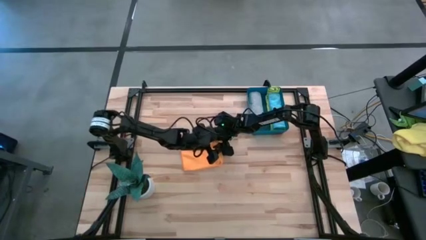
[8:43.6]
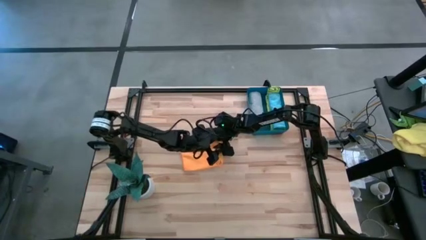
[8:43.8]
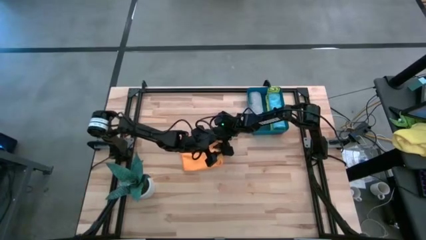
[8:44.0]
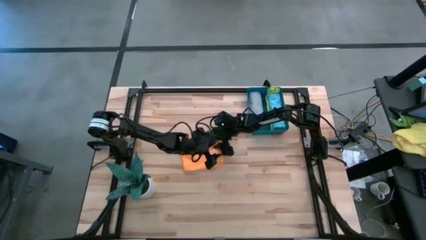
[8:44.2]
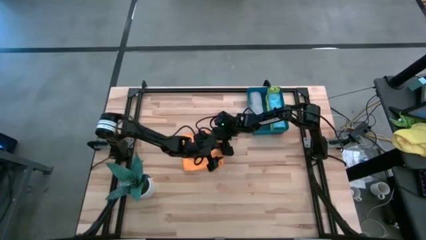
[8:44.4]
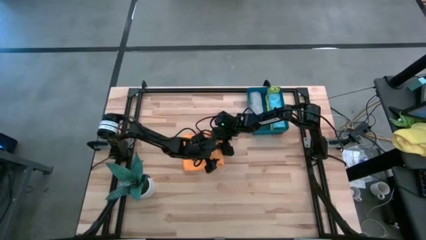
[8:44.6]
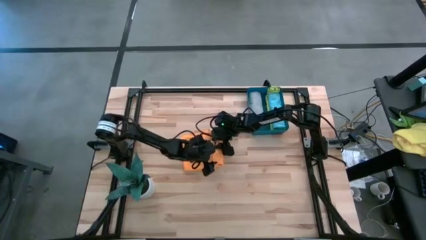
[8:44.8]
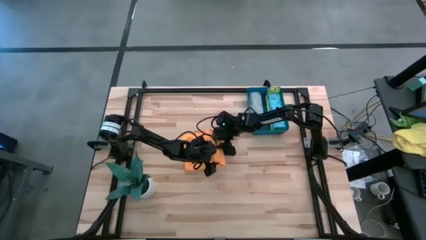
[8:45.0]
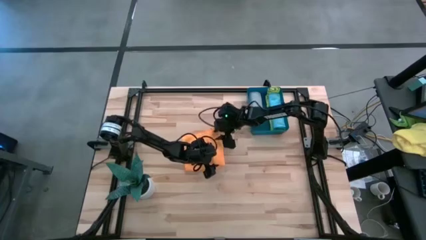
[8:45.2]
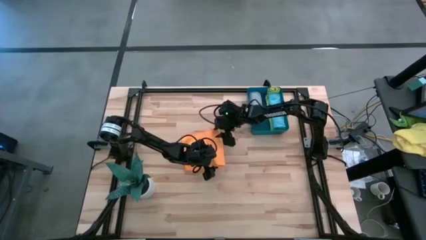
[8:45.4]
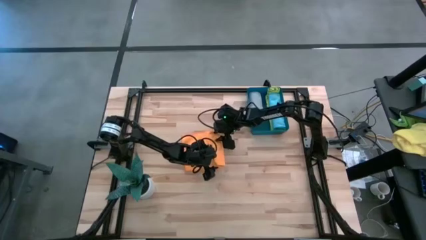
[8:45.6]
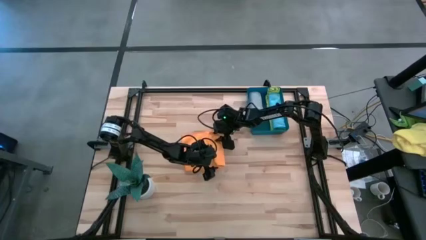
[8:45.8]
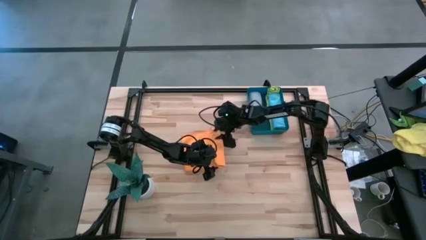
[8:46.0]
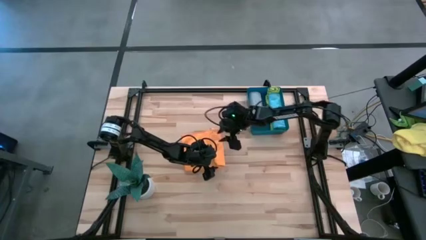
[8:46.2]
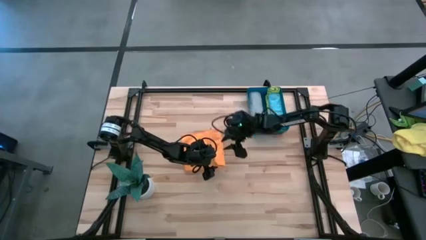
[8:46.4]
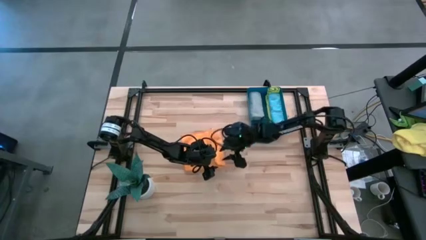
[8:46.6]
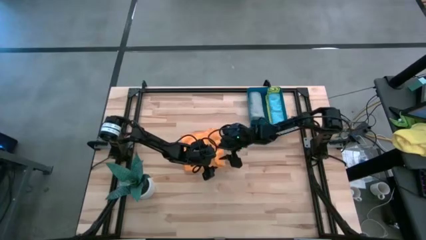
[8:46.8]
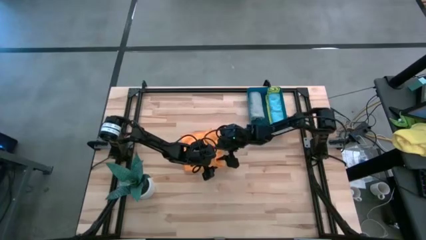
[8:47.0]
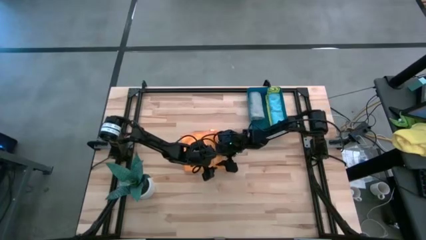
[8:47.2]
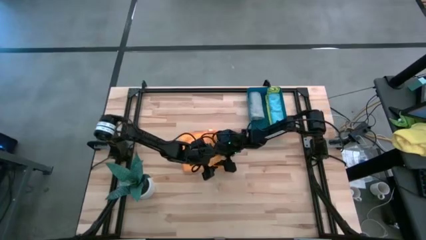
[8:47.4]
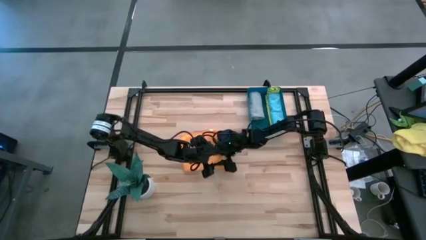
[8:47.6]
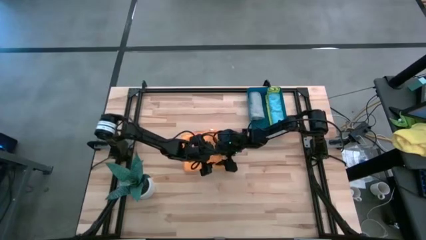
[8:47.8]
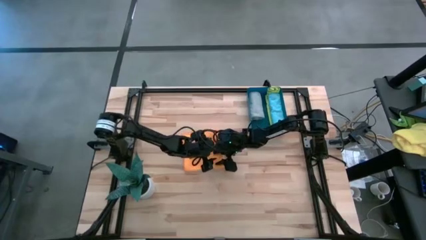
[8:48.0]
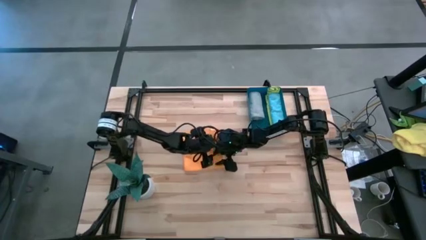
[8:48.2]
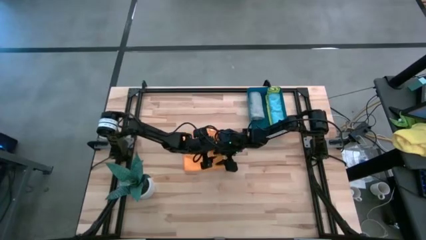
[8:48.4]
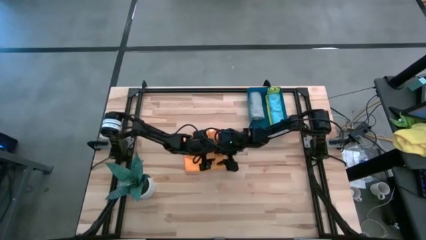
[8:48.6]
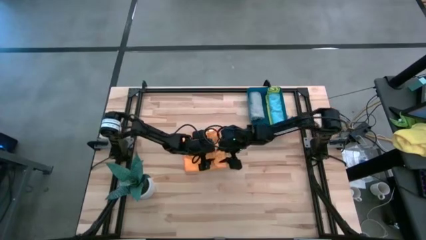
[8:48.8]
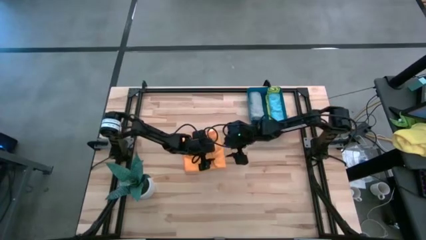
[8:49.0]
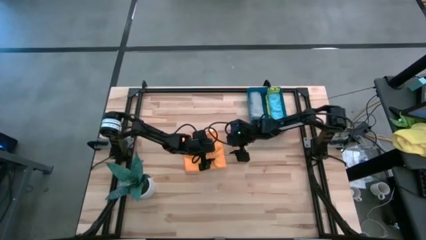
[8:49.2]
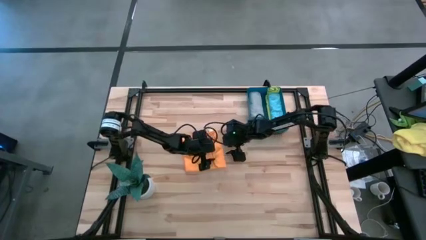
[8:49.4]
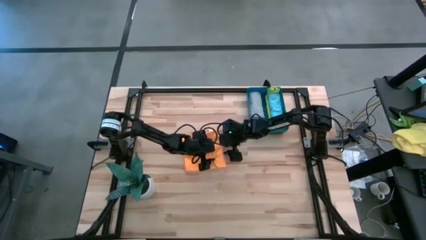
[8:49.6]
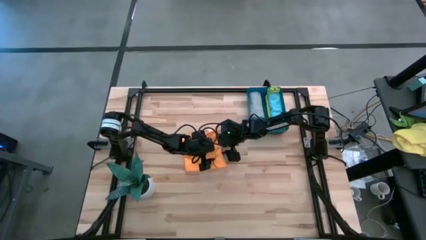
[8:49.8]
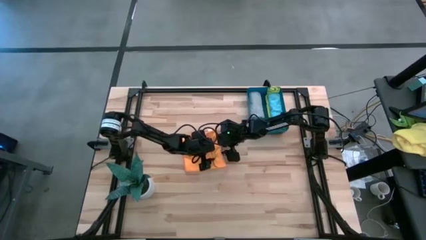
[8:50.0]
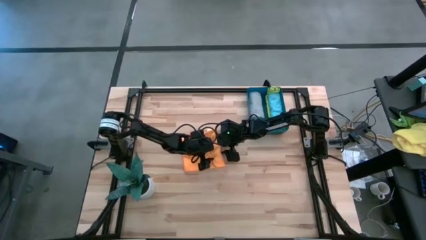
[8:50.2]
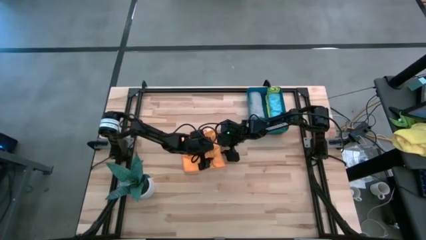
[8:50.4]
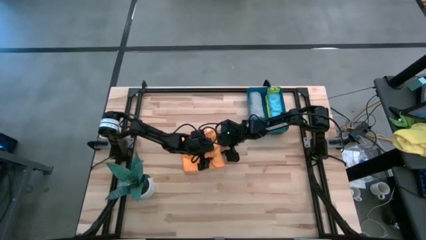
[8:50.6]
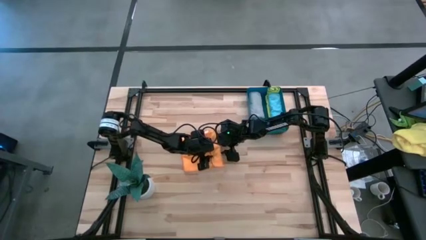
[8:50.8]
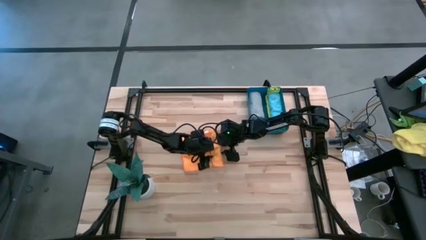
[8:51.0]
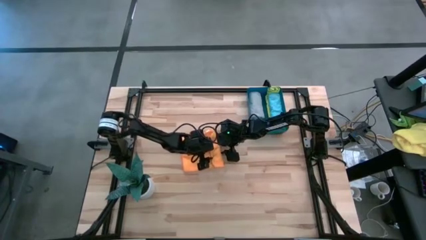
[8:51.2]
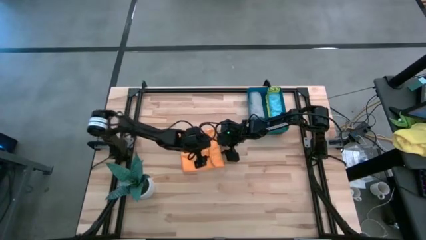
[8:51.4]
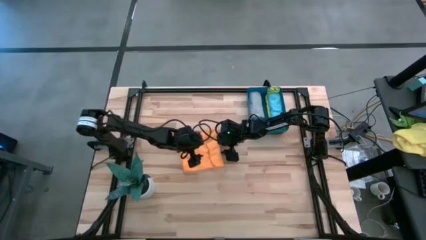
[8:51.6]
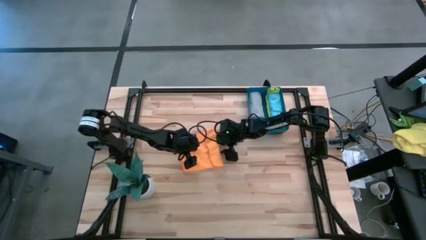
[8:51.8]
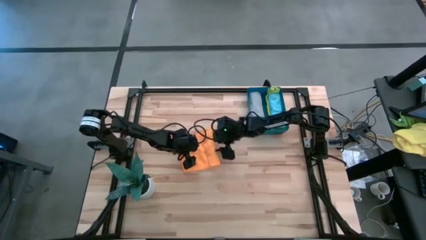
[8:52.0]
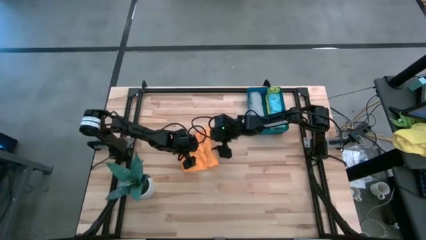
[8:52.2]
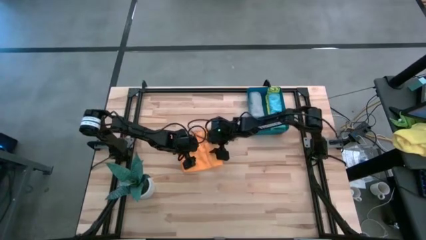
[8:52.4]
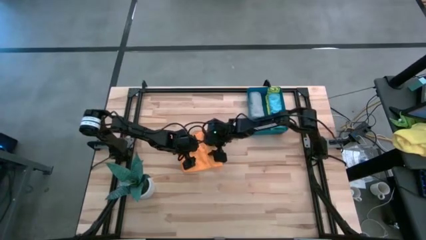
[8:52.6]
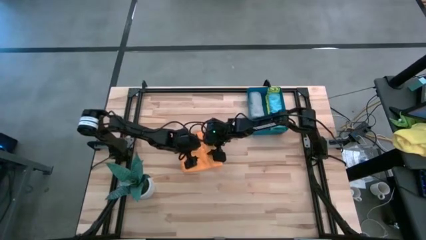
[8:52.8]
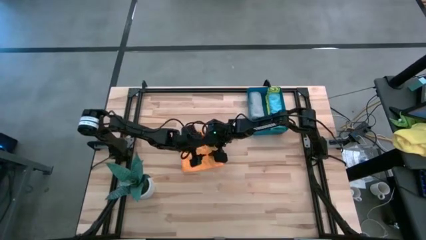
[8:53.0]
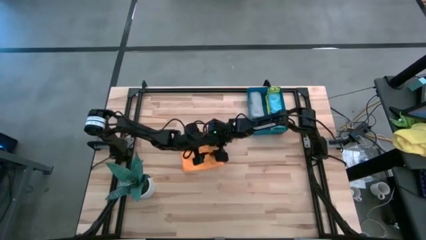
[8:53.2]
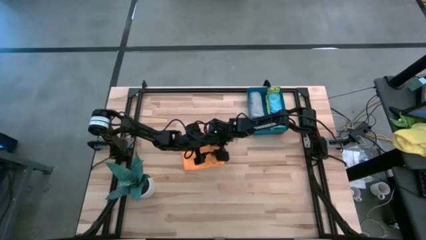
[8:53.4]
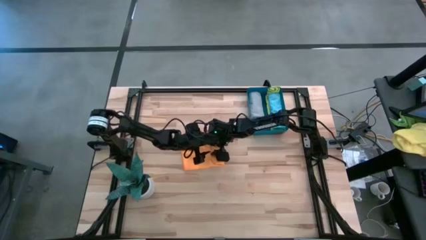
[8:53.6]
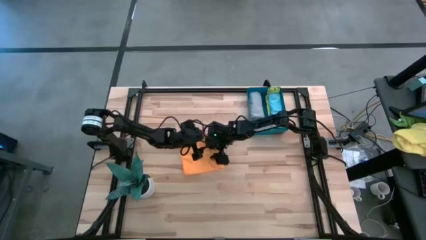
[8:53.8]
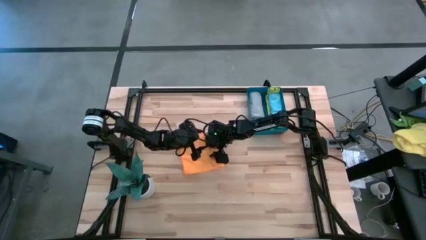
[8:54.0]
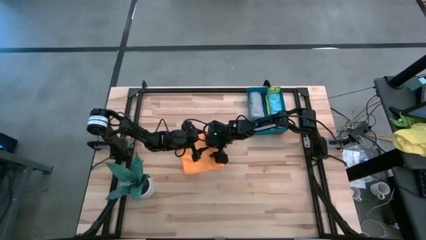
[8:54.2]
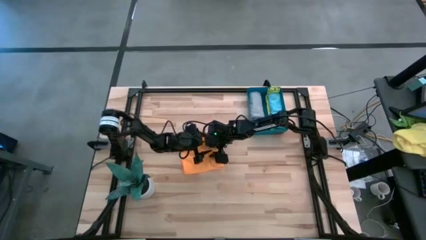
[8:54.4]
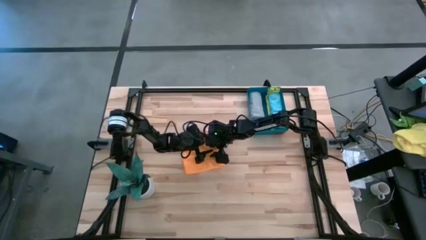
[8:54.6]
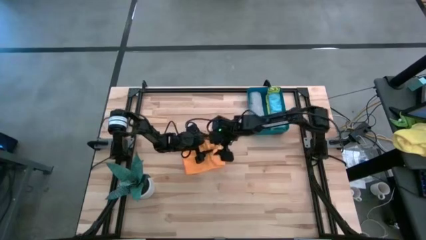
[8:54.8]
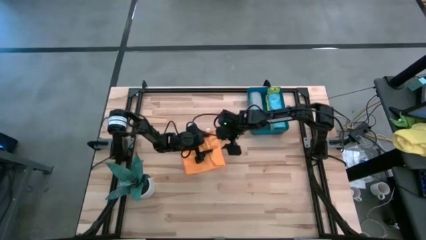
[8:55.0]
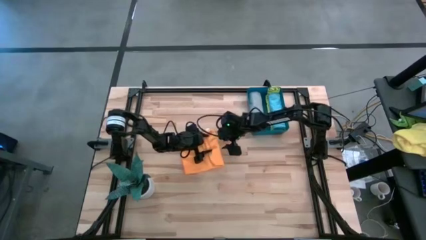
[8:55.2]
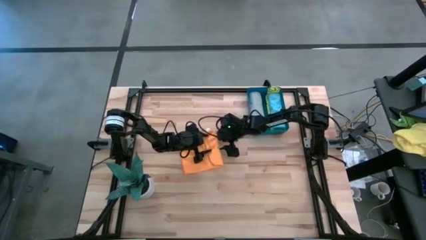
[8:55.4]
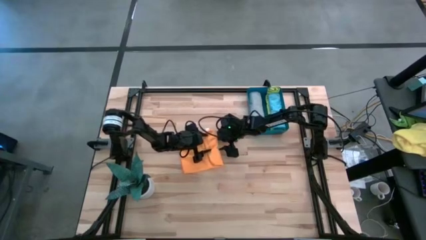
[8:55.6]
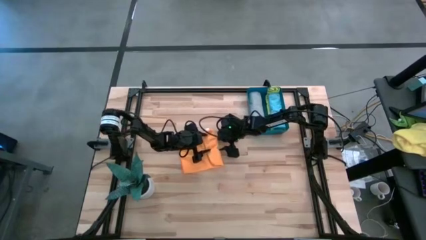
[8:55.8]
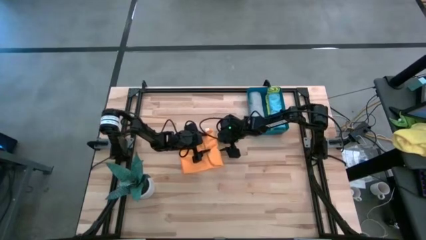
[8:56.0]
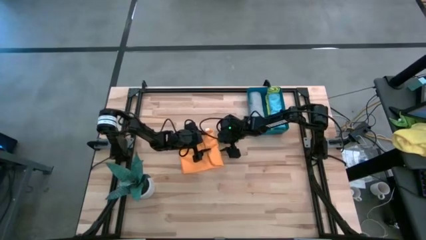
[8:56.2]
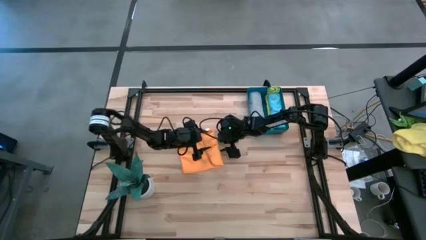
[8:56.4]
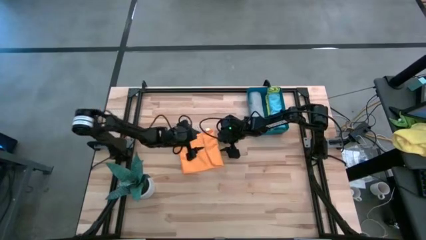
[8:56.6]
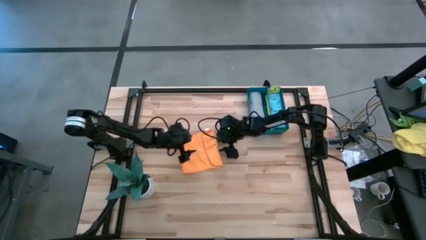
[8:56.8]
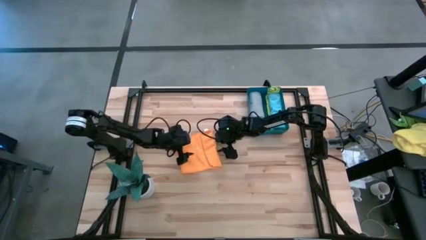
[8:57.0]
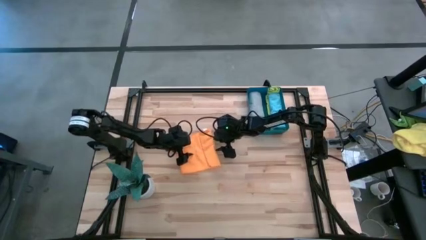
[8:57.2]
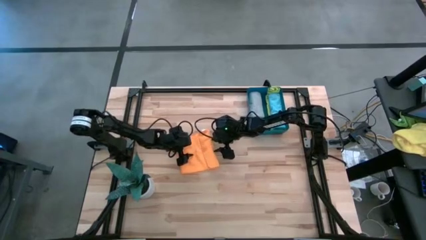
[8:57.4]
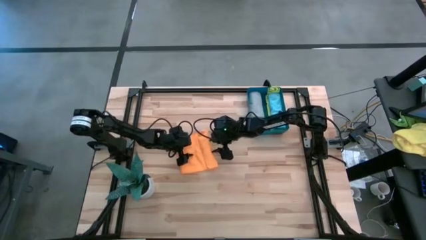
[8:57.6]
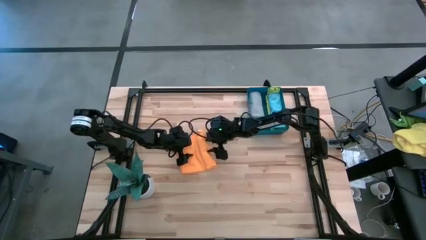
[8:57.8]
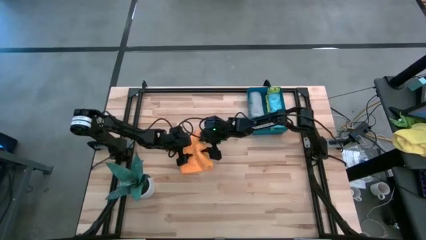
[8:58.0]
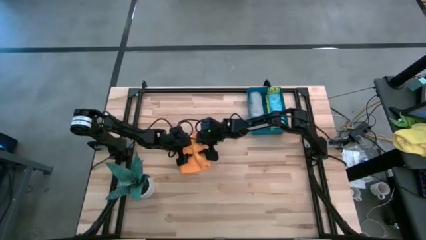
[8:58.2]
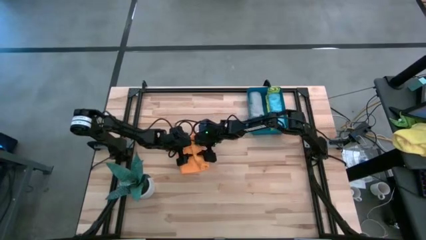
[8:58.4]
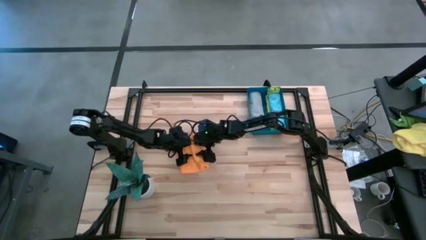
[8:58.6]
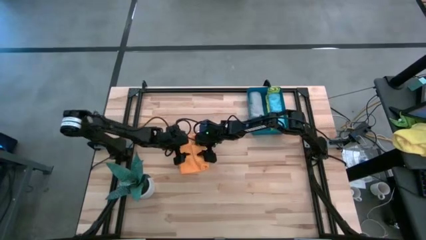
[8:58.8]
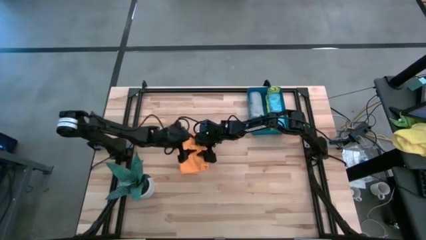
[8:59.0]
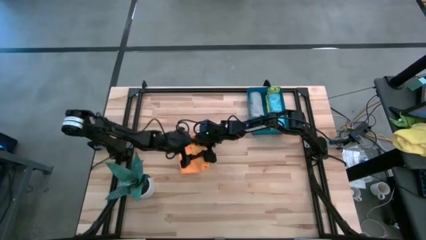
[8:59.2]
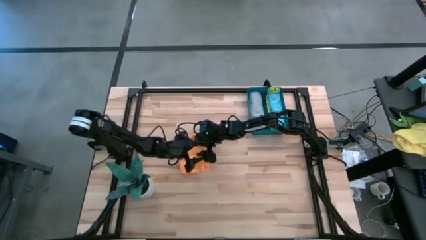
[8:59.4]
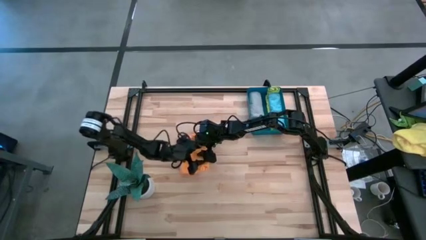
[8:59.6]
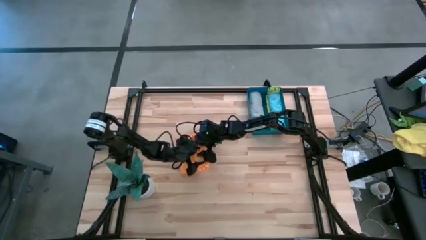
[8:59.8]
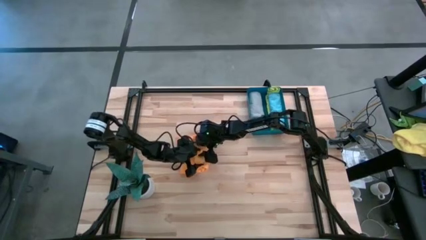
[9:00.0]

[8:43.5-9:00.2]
Task: Roll microfiber towels into tight, uniform cylinder then place into a basket
Roll the orange towel
